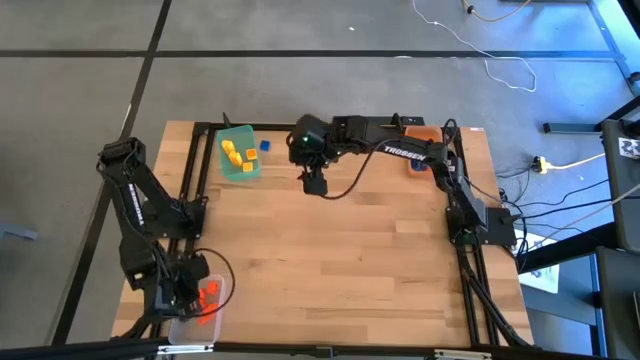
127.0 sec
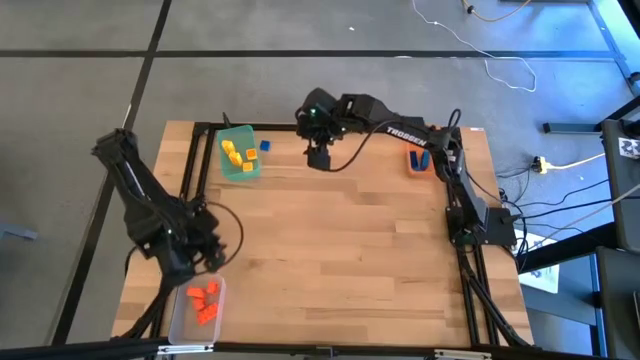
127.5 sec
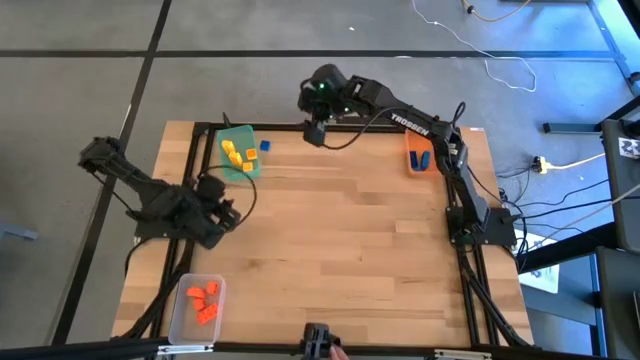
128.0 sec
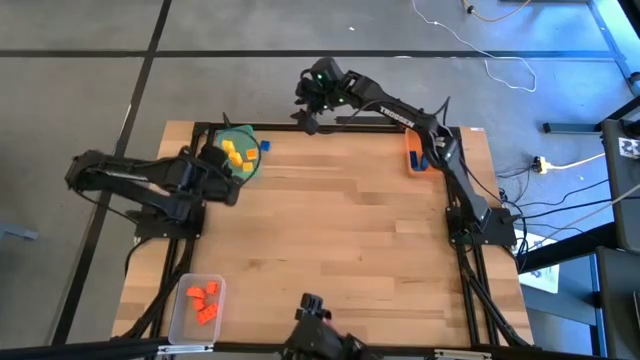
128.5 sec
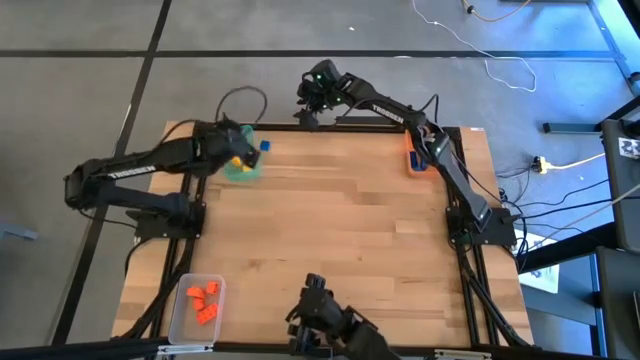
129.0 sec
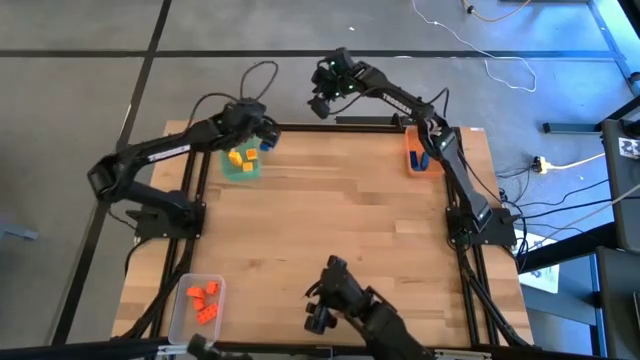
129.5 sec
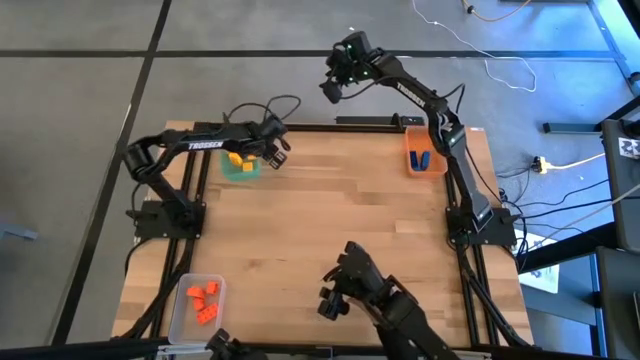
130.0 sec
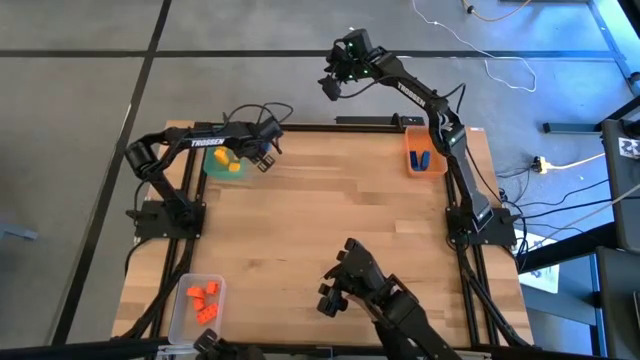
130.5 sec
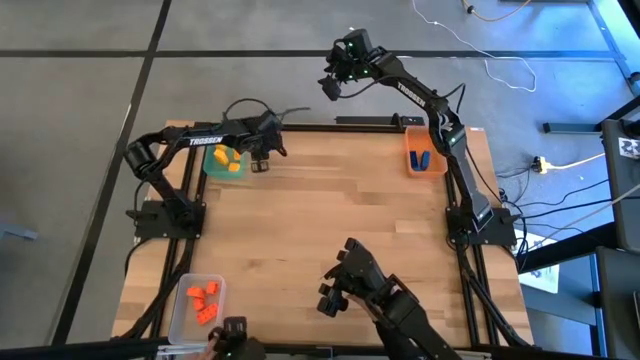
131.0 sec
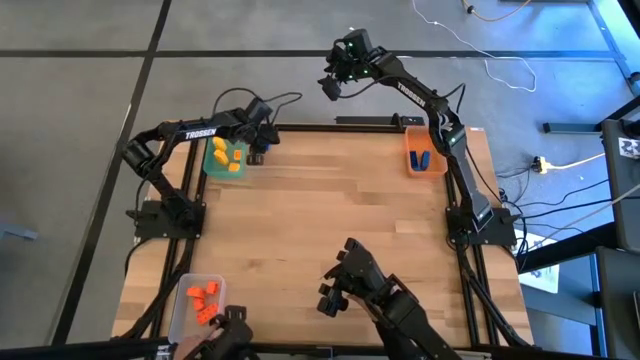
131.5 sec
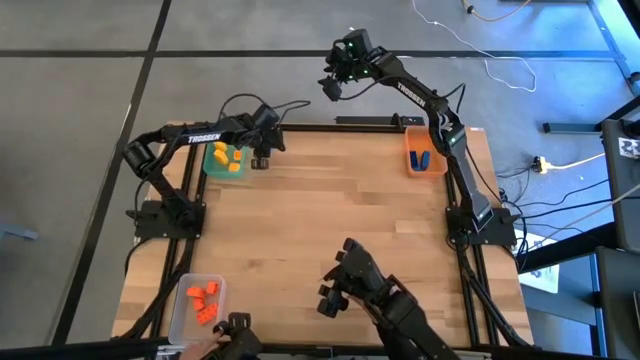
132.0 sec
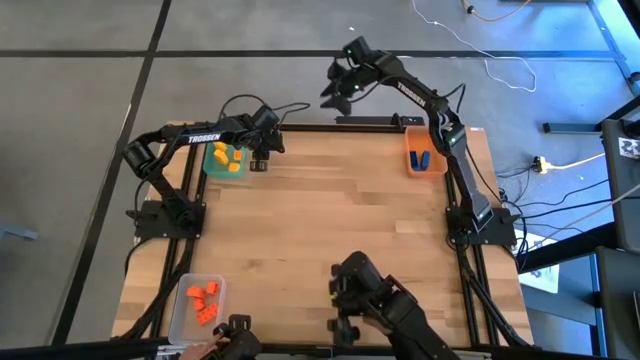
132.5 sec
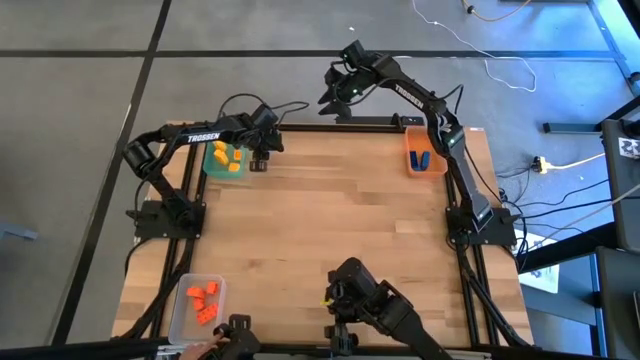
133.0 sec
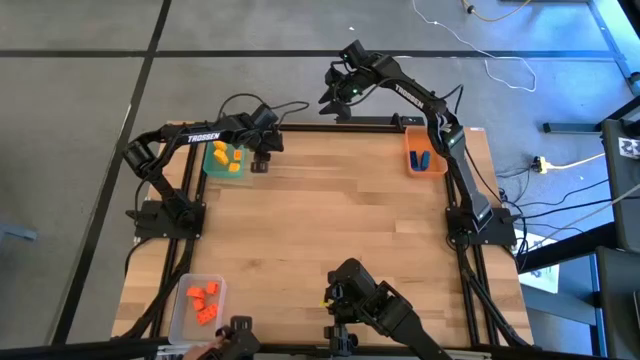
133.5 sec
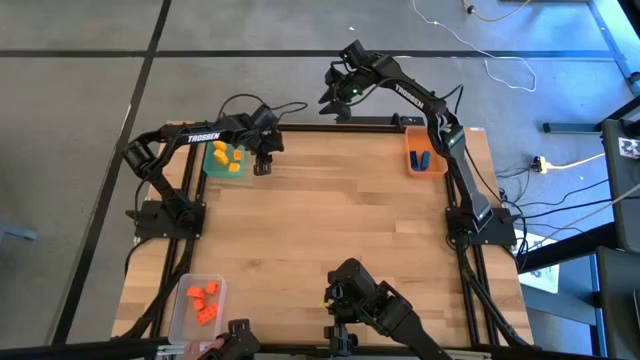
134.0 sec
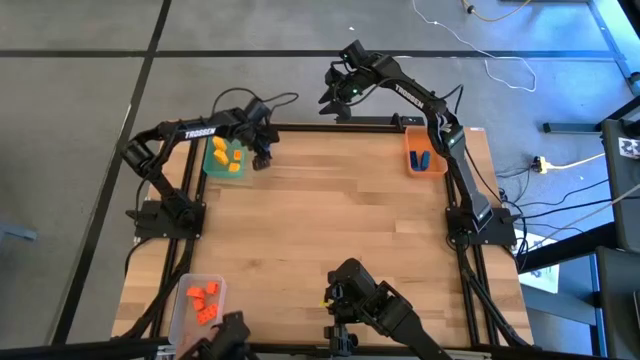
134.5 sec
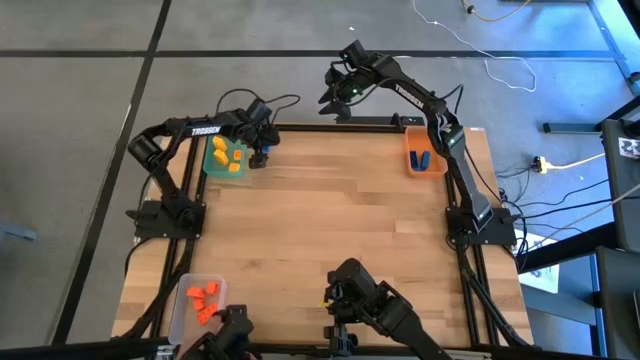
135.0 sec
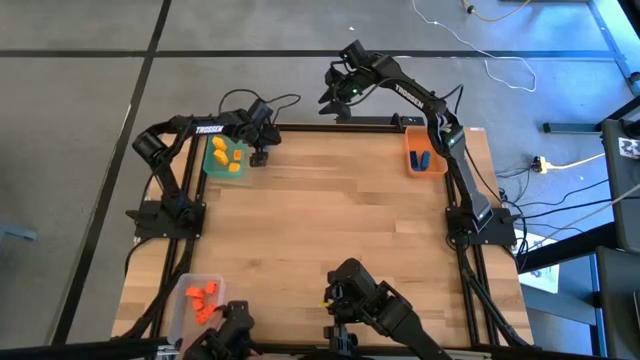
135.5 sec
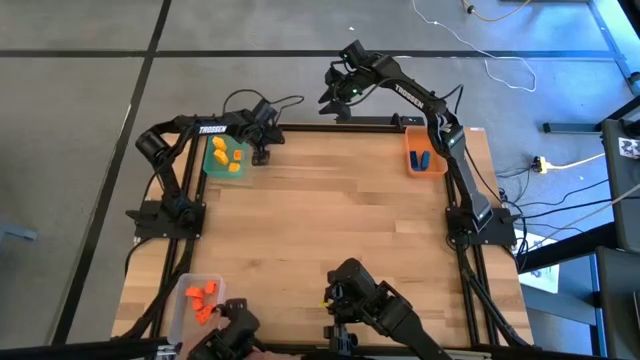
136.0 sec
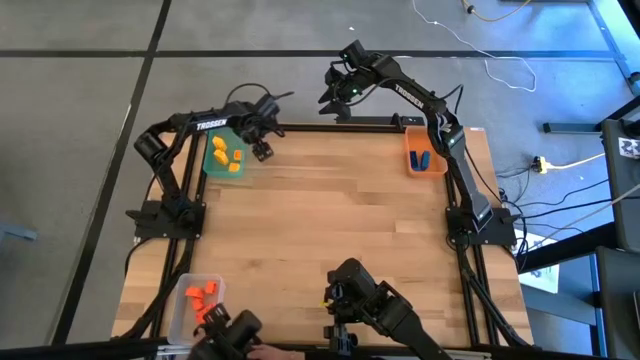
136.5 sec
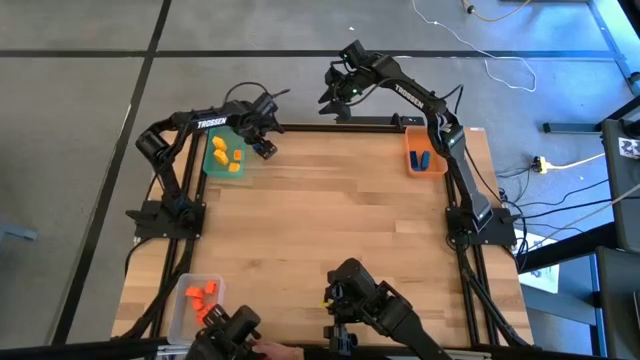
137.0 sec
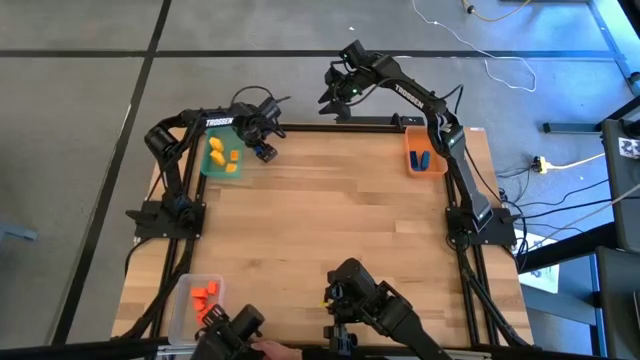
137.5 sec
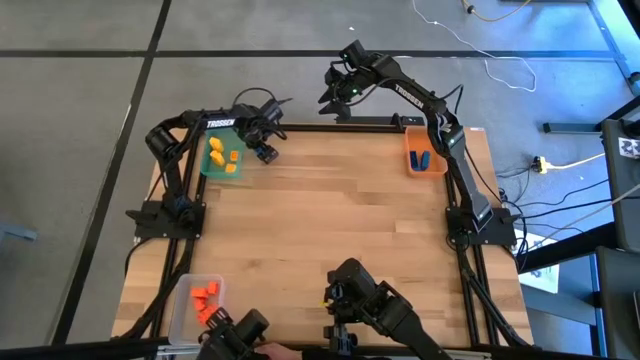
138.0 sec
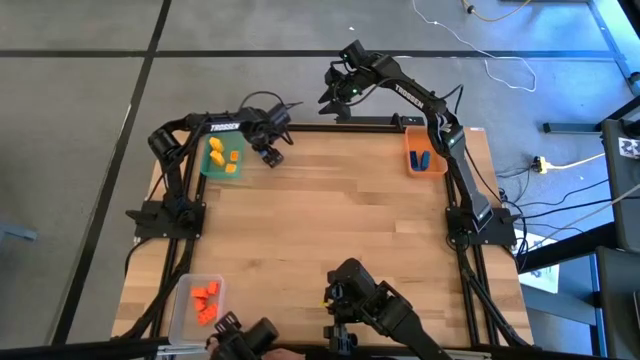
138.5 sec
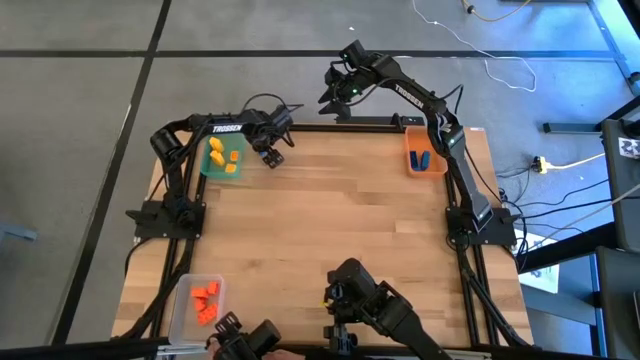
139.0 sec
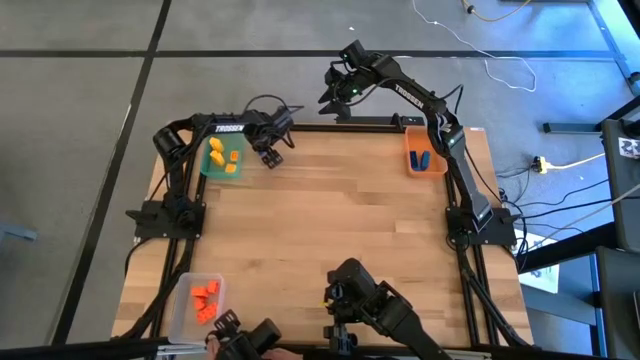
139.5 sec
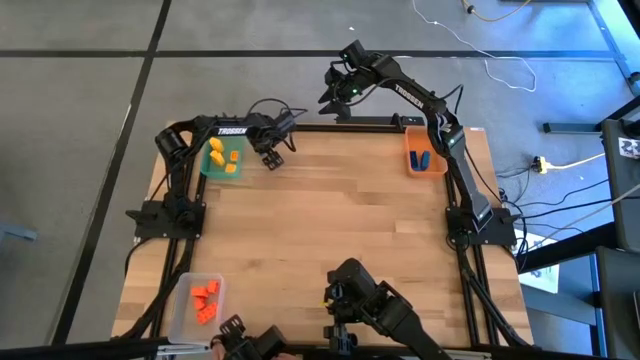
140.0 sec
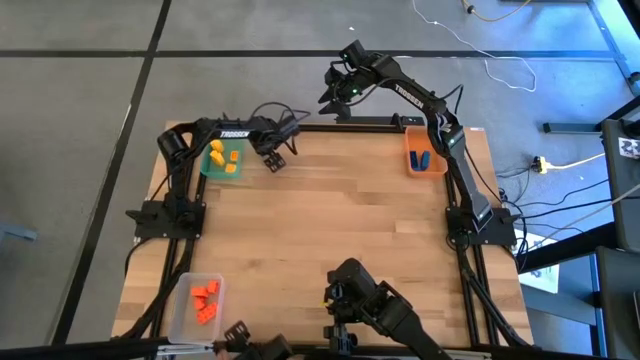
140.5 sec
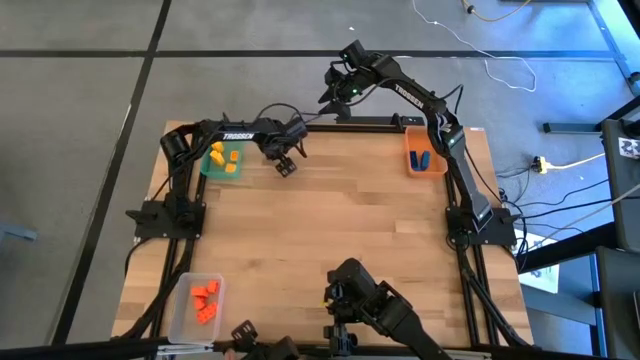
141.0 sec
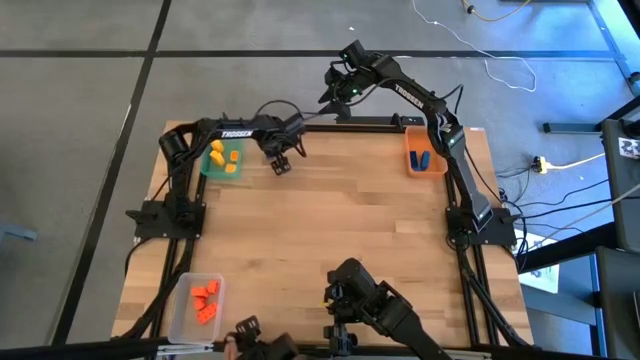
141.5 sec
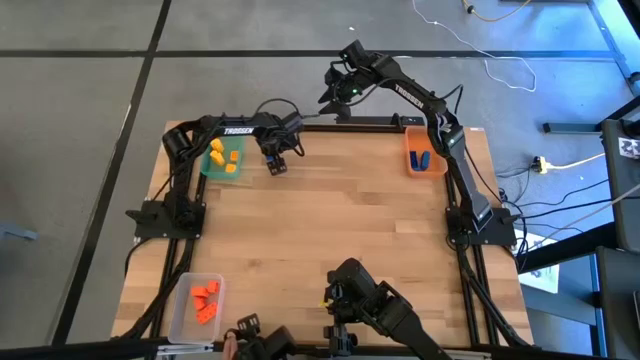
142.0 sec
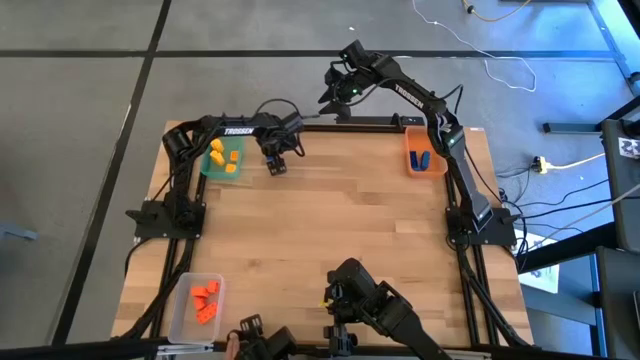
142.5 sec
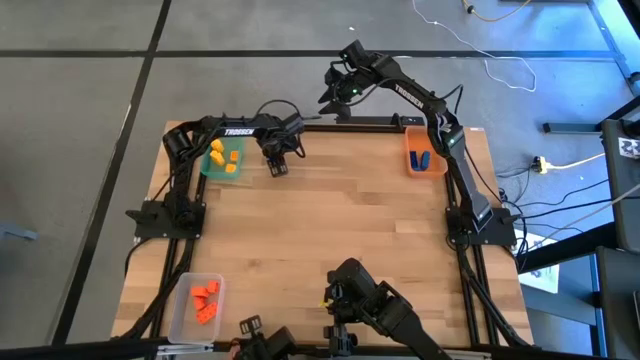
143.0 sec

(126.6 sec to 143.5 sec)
Task: Sort & place blocks by color
Put the blue game piece into the orange bin

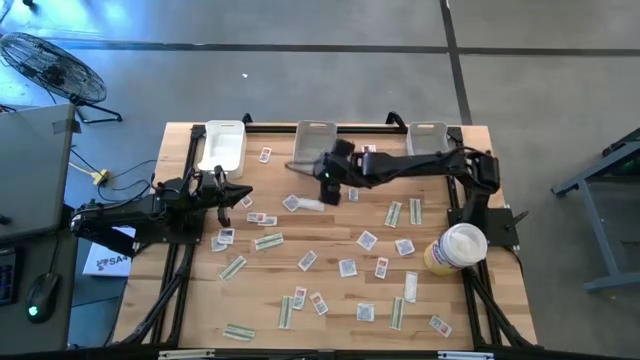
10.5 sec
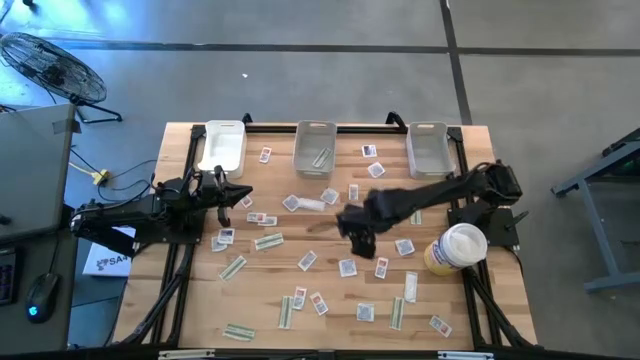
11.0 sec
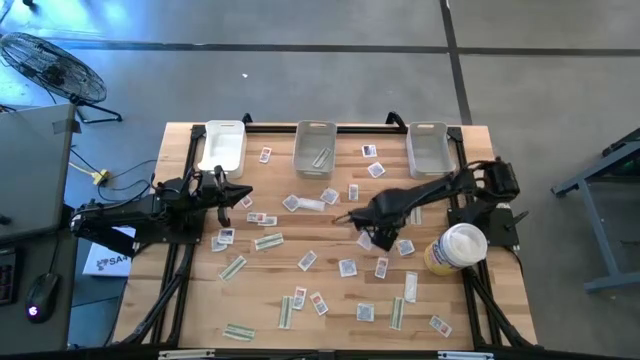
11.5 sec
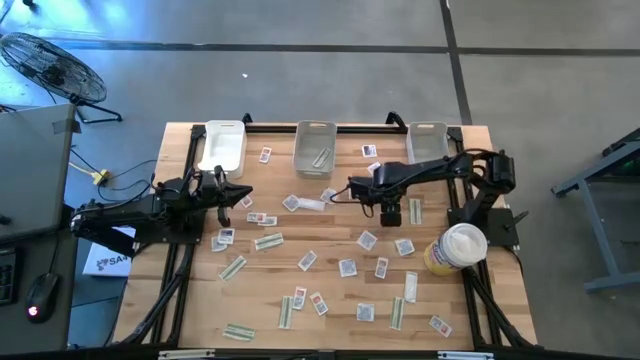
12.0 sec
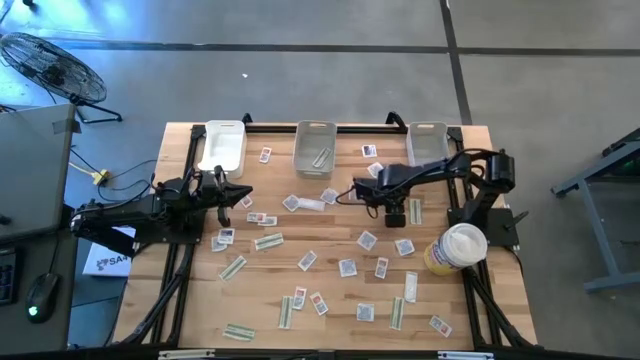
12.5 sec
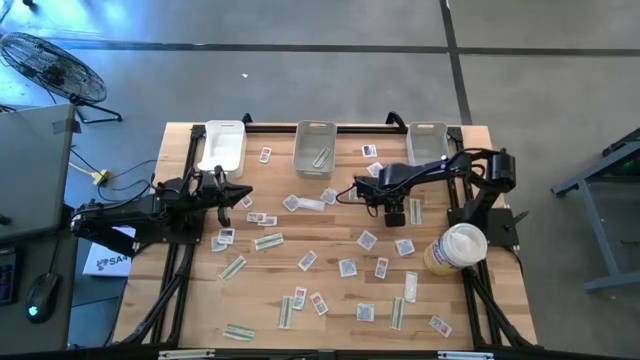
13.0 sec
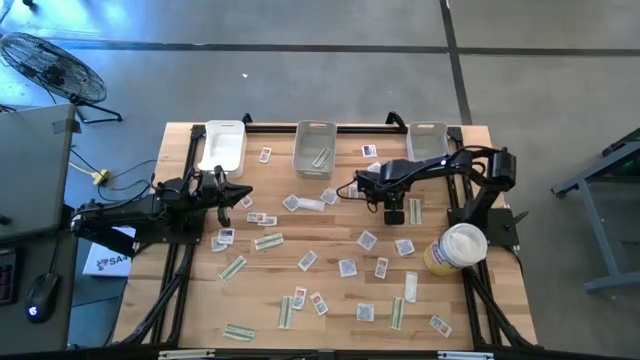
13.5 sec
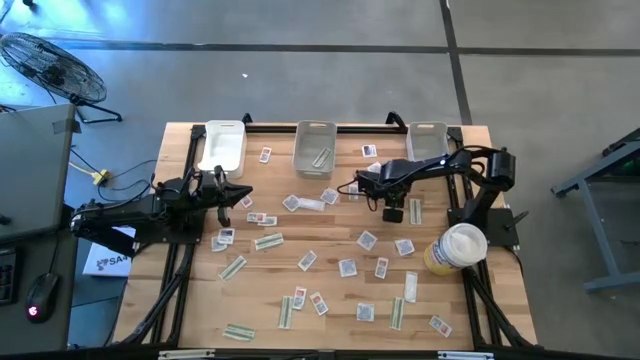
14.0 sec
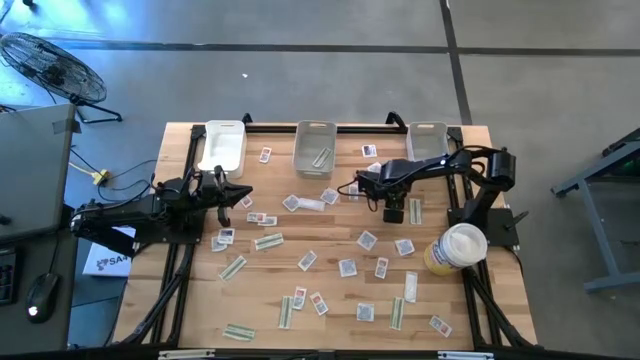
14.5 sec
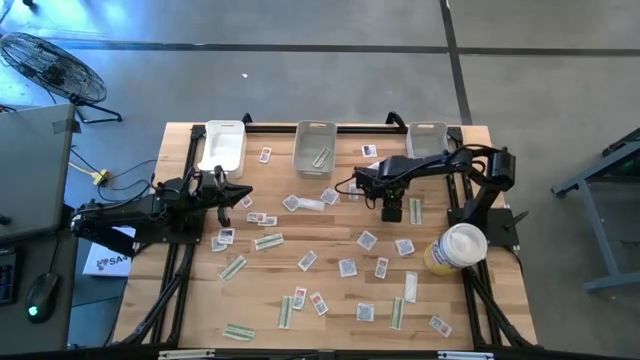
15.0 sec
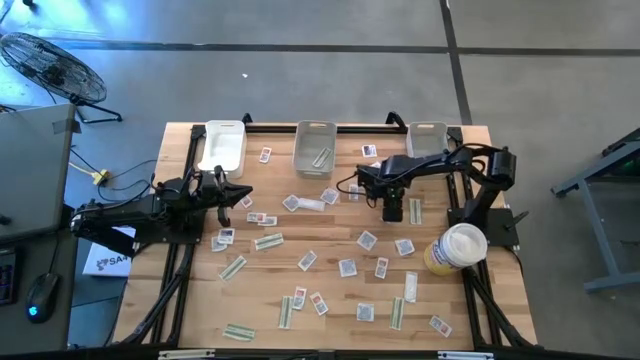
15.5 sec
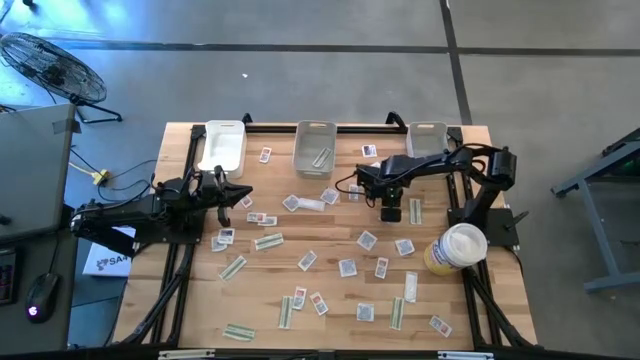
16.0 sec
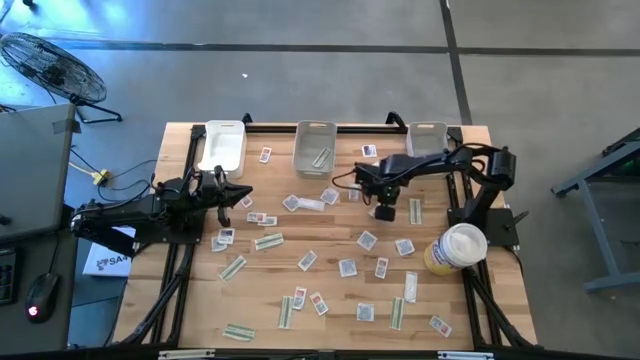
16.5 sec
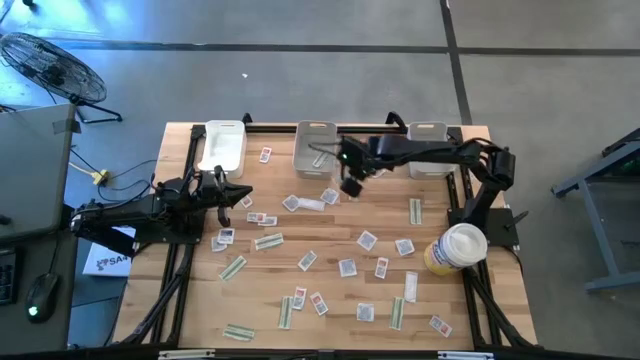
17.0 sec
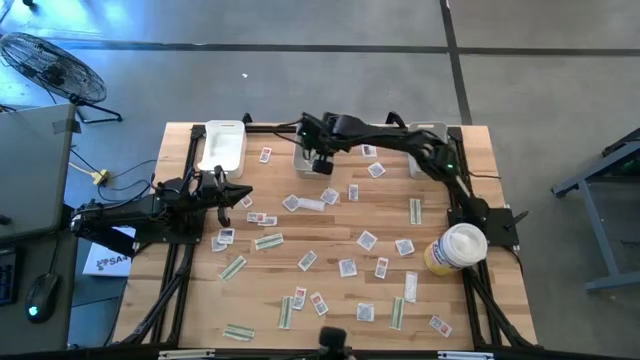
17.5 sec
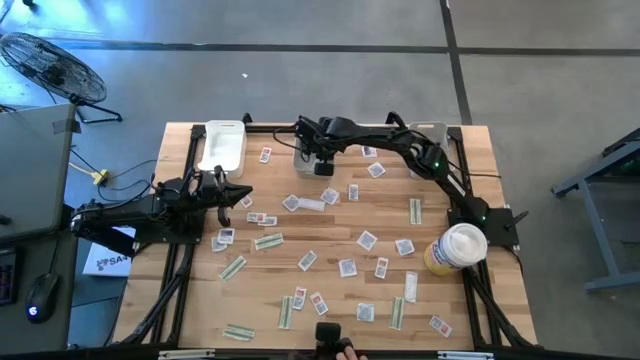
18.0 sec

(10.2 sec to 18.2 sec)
Task: Pick & Place First Aid Supplies
Put the green pad into the left gray bin
